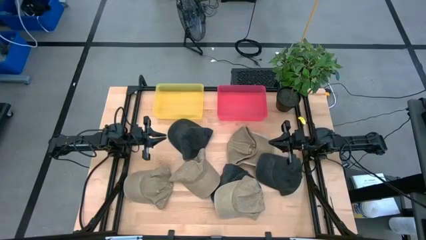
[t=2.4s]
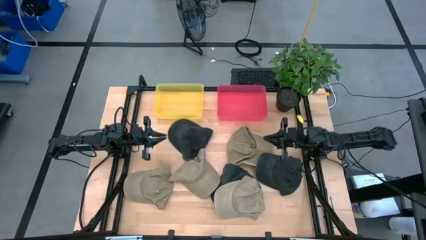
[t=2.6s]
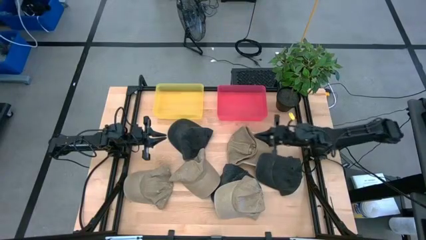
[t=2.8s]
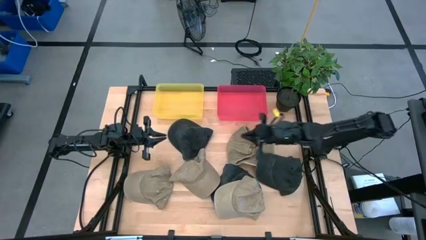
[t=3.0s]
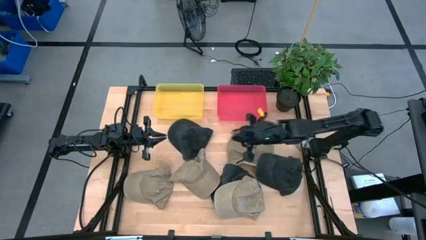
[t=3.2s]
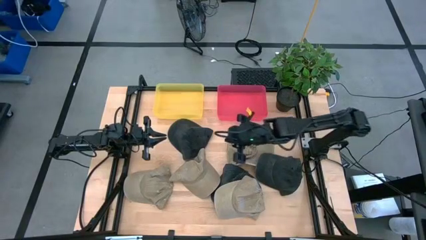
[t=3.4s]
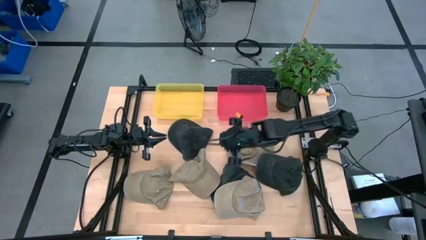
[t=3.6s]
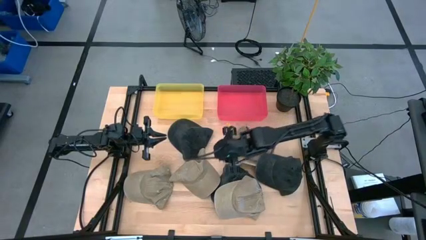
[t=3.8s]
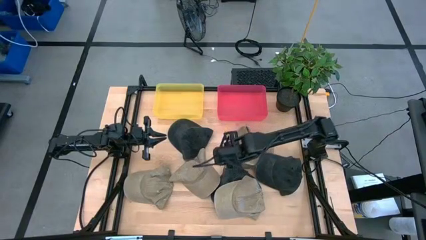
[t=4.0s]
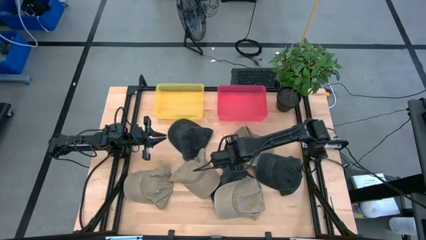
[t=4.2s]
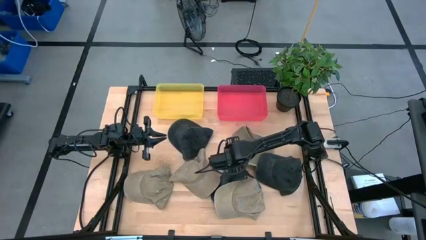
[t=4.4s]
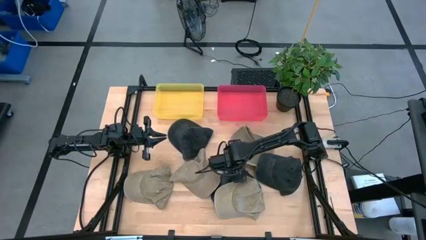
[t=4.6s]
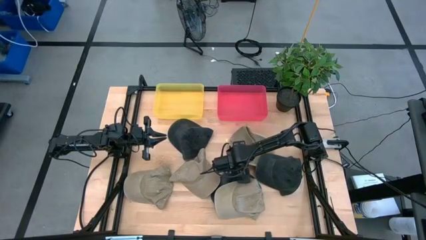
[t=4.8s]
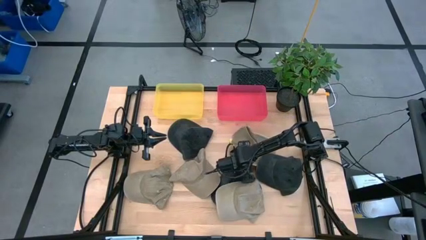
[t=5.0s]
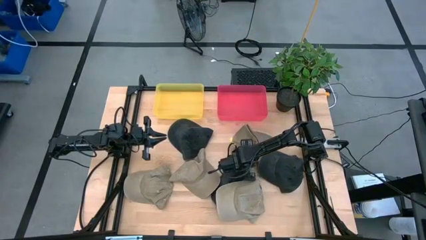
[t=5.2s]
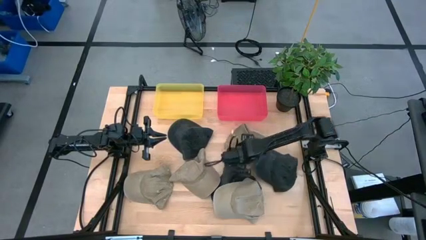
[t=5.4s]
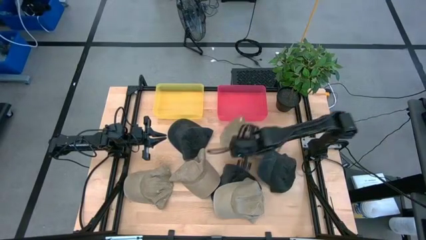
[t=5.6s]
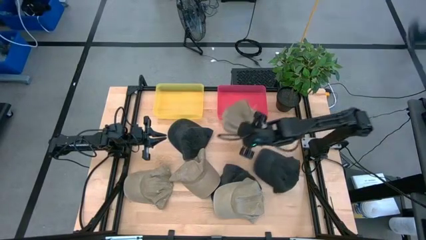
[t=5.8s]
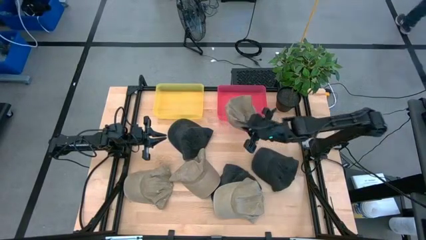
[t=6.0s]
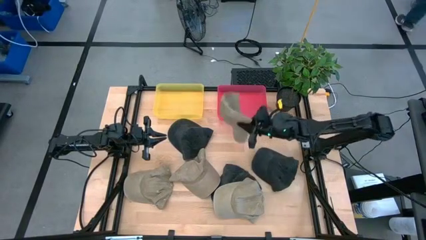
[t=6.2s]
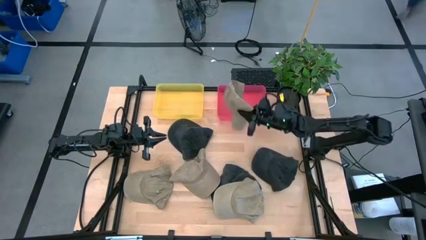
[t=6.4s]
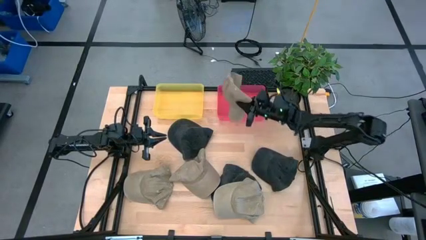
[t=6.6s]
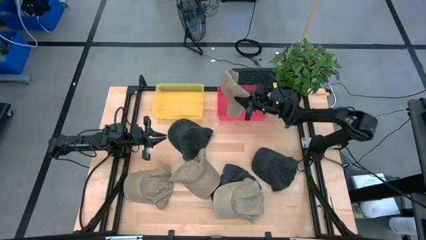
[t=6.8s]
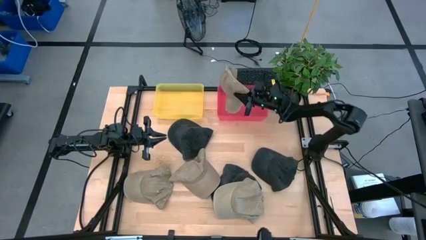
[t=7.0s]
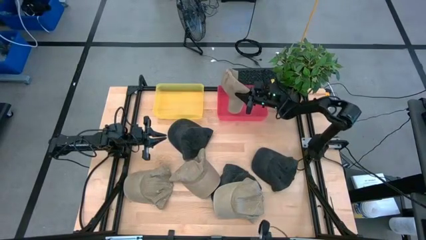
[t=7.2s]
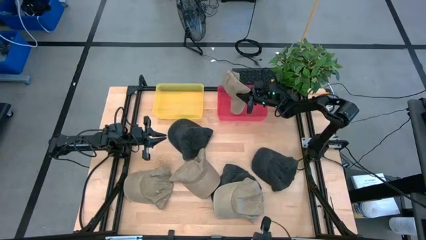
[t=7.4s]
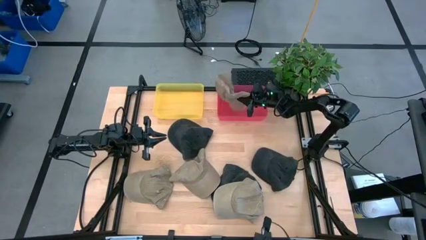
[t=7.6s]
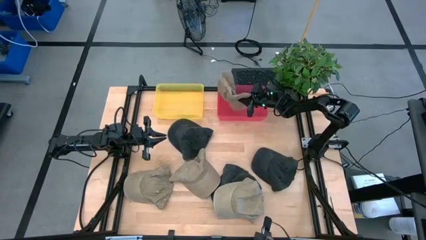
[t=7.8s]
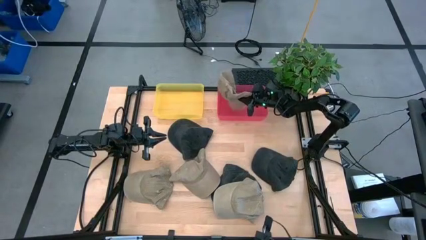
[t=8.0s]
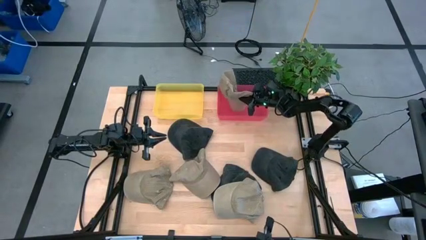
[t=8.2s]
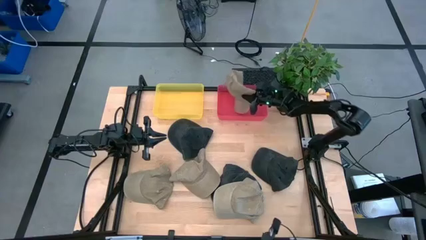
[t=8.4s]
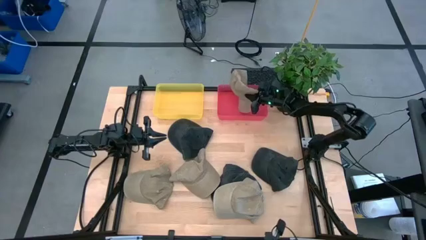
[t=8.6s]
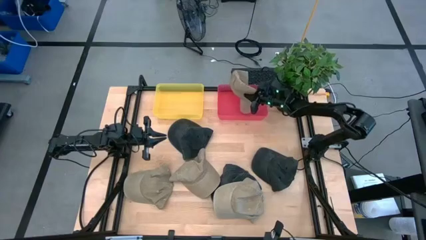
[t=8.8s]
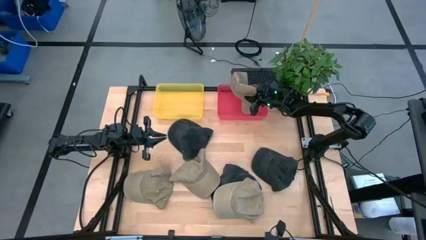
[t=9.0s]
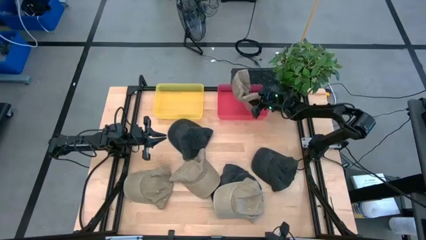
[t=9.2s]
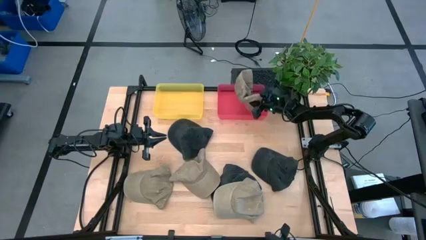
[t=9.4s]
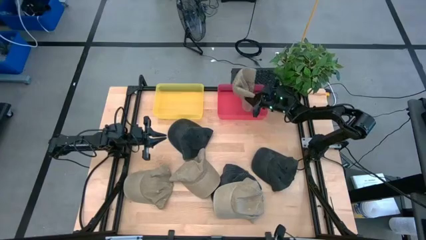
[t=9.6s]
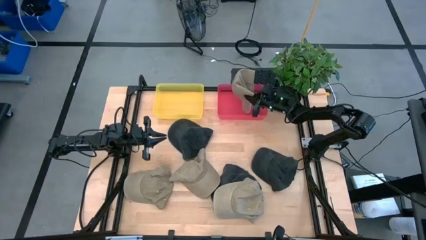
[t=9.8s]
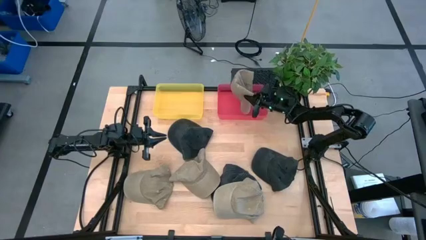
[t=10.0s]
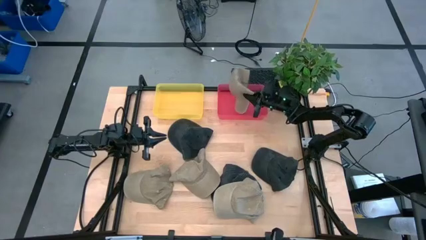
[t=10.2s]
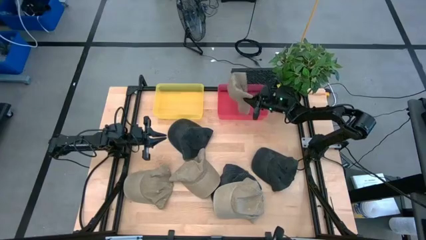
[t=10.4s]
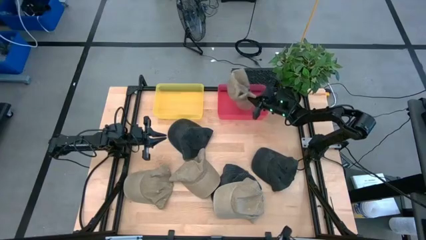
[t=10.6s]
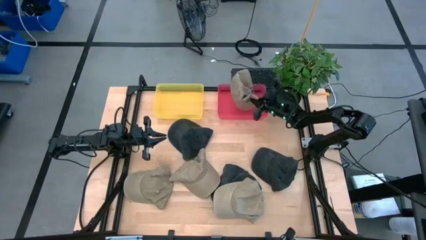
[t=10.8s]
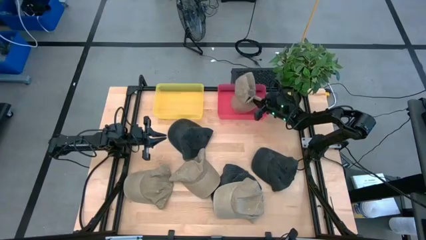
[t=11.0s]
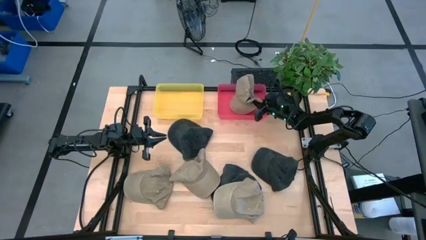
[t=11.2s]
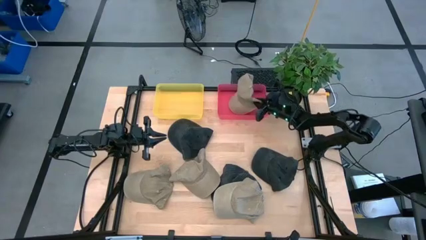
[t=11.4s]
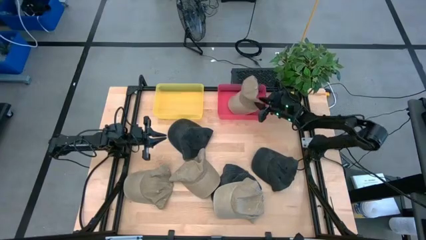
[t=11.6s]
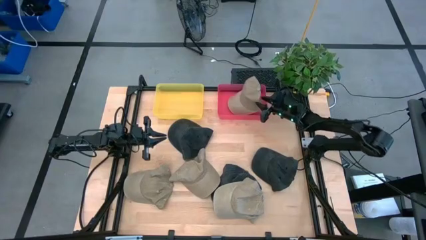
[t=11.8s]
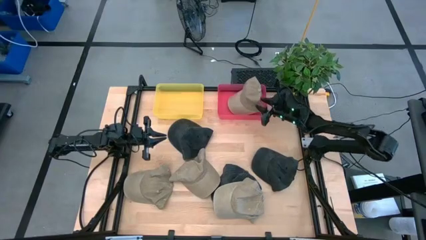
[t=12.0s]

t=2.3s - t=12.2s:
Task: Pick & Place hat
Put the brown cap into the red bin

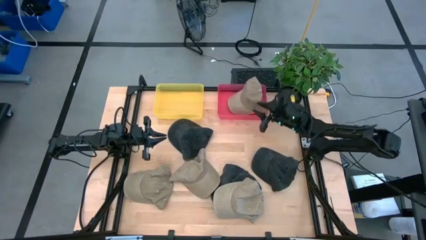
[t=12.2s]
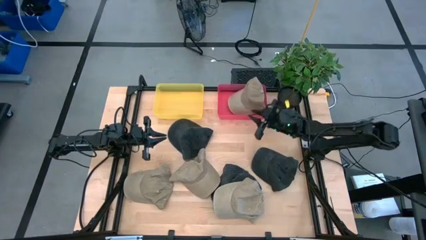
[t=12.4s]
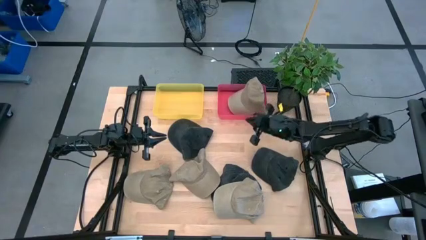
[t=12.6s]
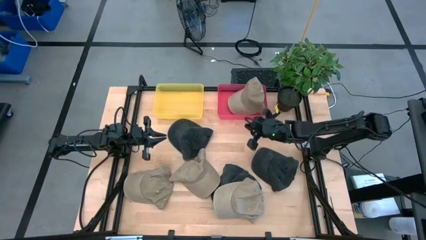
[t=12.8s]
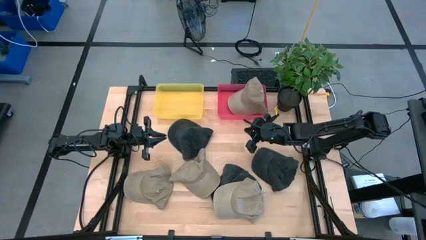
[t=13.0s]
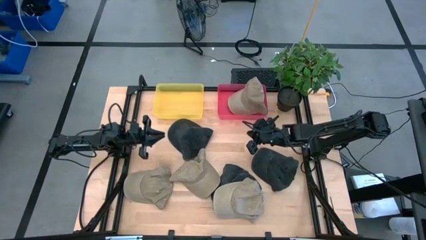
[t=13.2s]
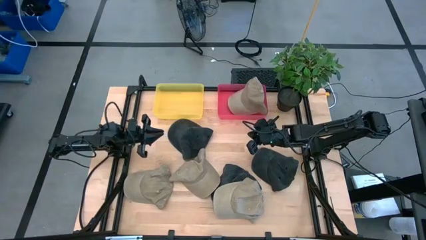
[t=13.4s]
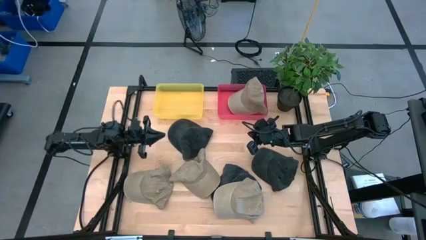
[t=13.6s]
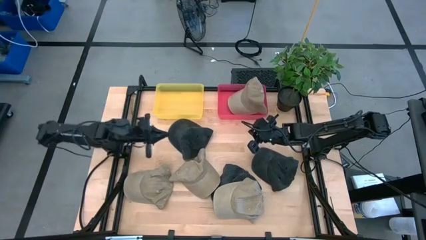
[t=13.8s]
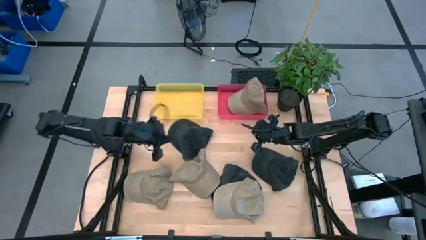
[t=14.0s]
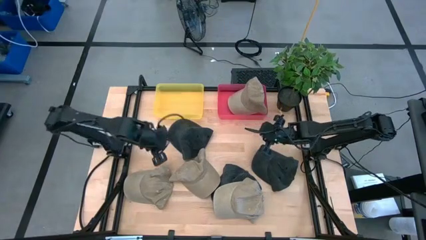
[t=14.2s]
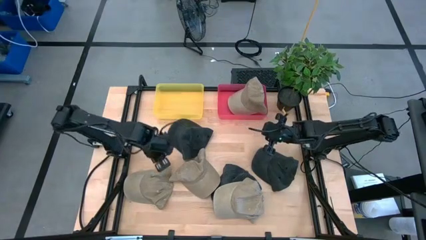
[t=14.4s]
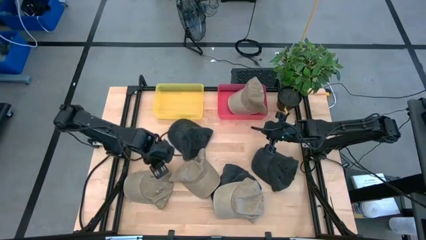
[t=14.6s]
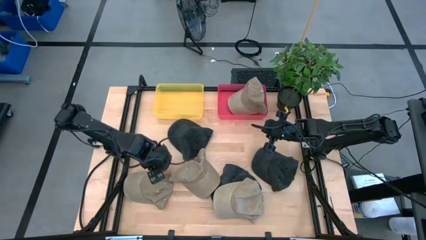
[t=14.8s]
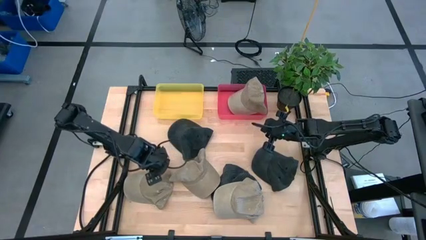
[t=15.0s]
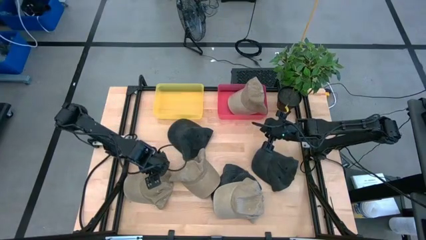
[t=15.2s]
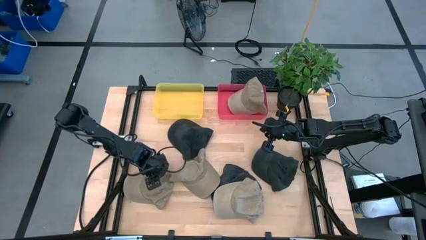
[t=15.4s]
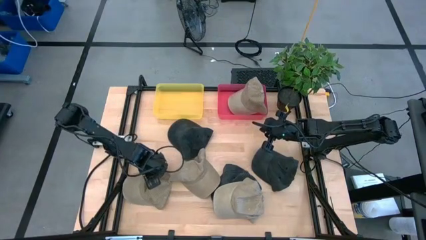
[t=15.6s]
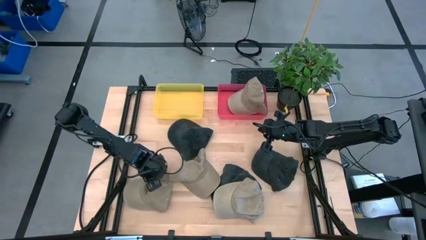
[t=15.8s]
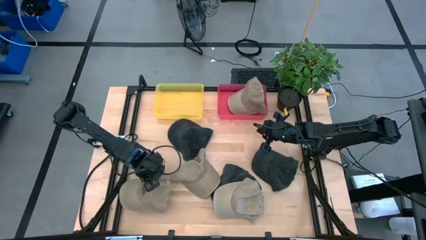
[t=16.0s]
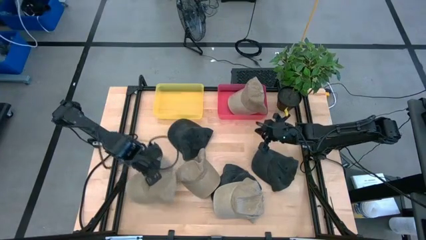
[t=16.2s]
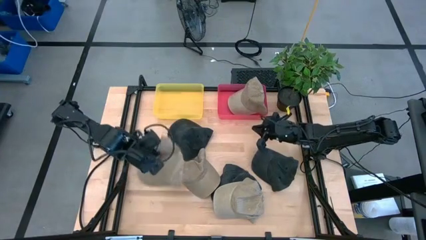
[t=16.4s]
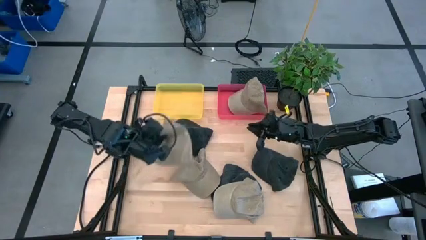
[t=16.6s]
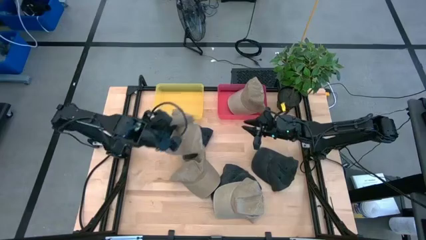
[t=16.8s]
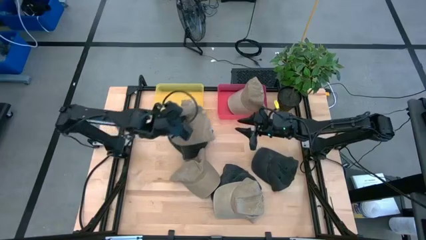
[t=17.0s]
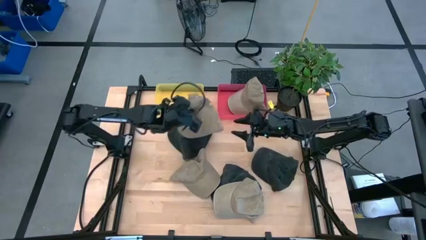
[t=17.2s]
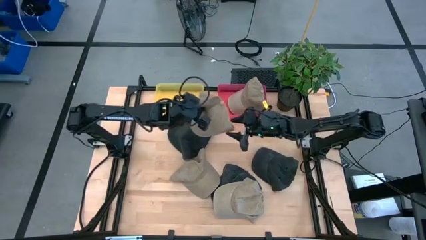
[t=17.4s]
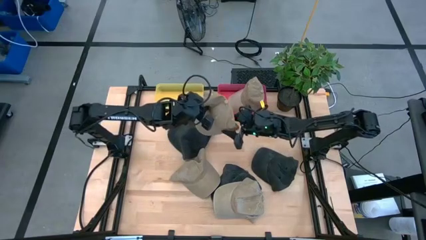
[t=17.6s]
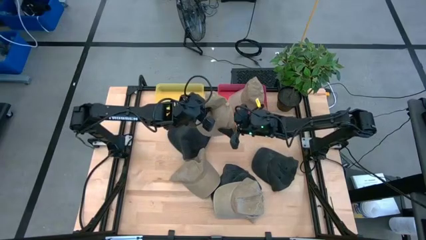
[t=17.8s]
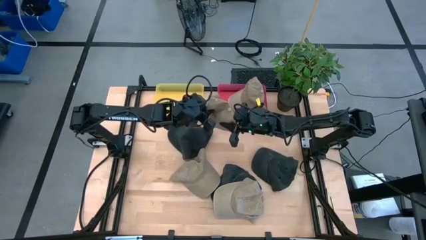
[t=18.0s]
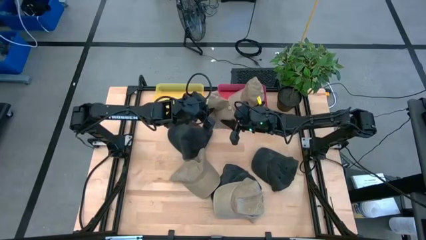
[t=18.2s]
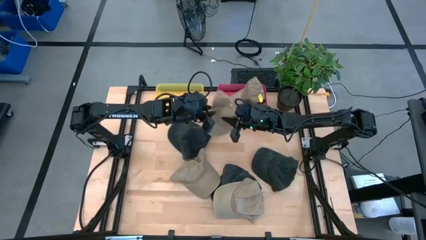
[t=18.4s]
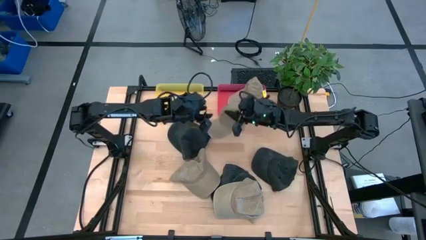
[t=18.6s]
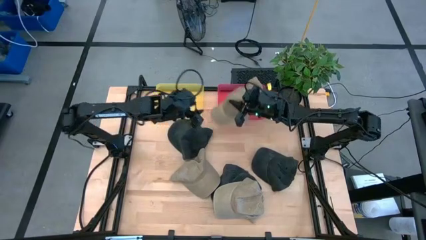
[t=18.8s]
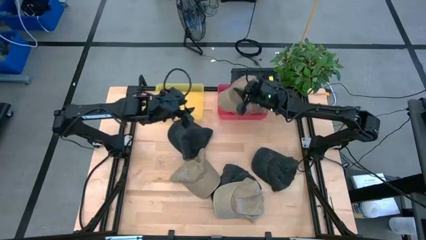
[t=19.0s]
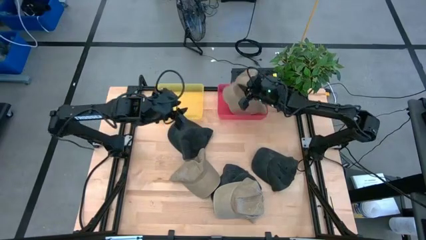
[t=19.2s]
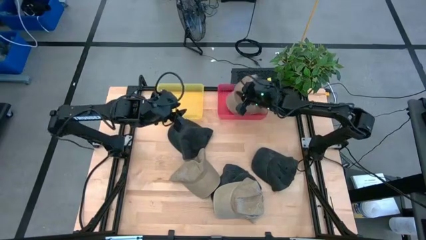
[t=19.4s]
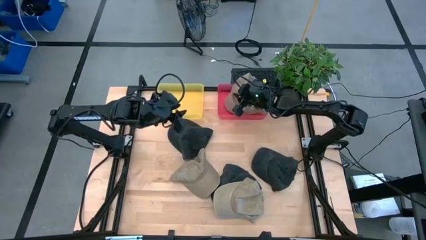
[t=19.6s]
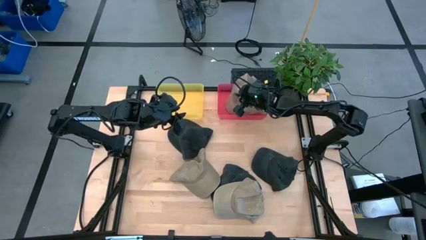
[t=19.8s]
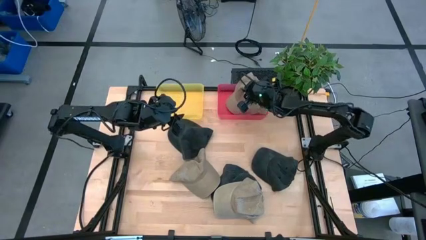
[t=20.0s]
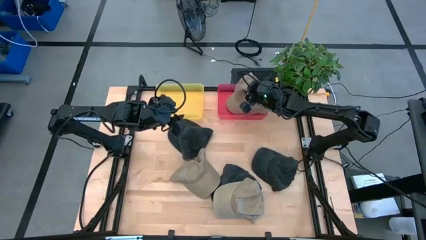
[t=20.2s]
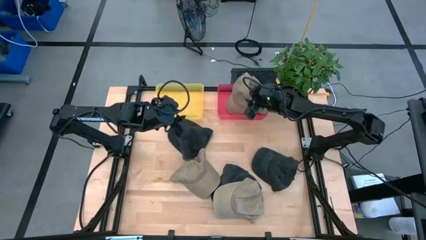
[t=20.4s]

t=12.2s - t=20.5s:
Put the brown cap into the red bin
